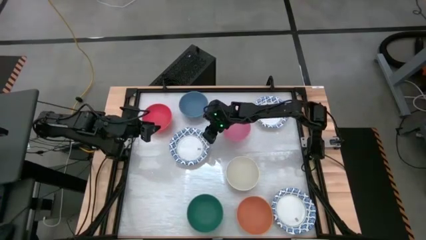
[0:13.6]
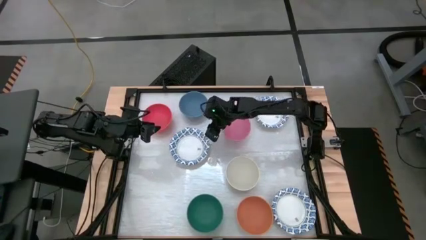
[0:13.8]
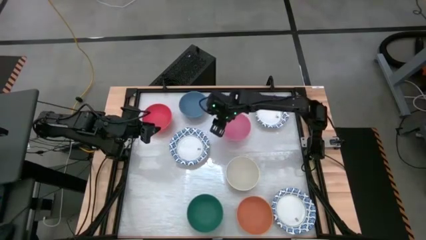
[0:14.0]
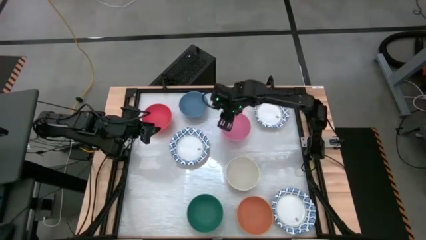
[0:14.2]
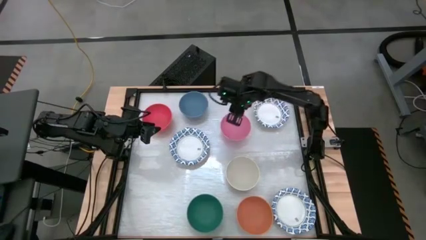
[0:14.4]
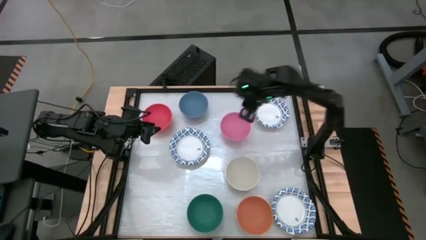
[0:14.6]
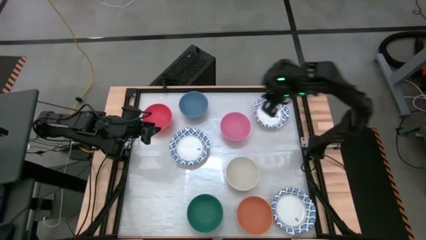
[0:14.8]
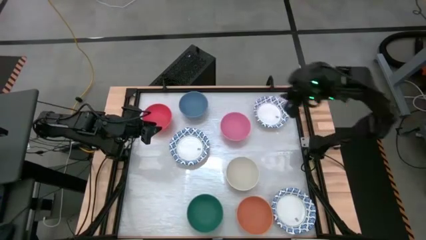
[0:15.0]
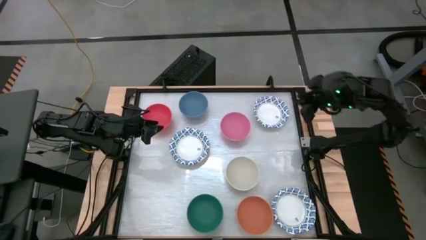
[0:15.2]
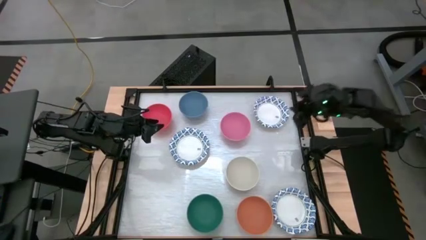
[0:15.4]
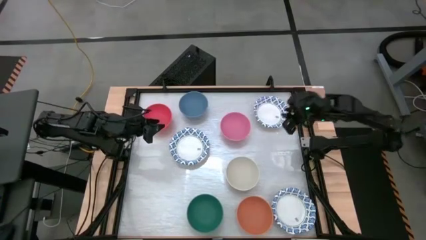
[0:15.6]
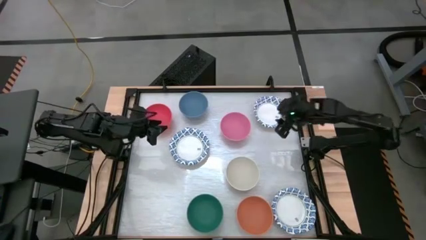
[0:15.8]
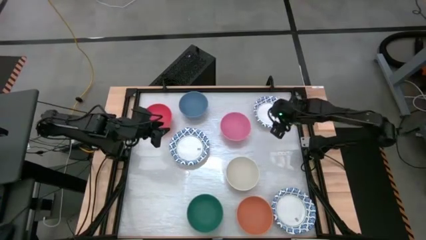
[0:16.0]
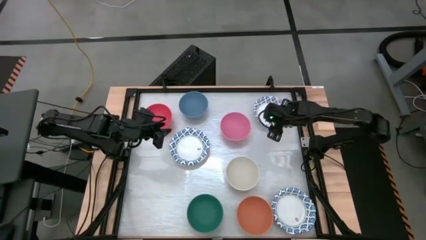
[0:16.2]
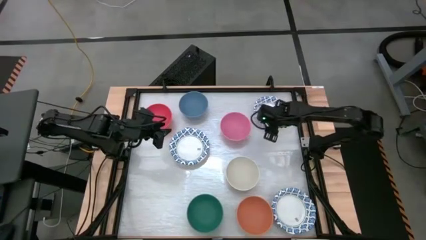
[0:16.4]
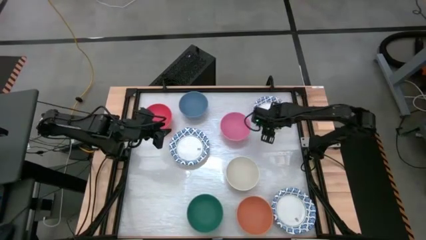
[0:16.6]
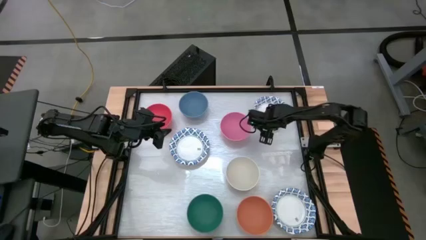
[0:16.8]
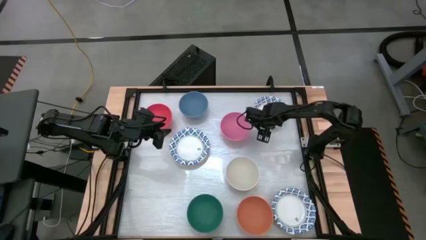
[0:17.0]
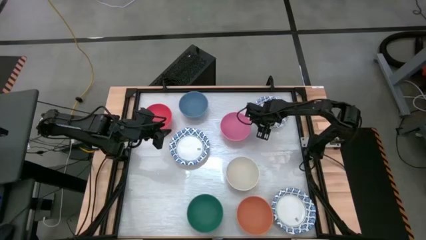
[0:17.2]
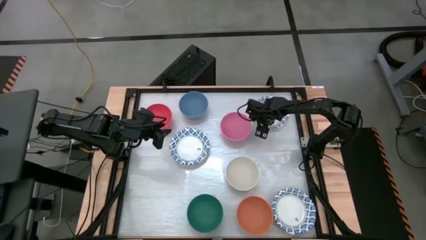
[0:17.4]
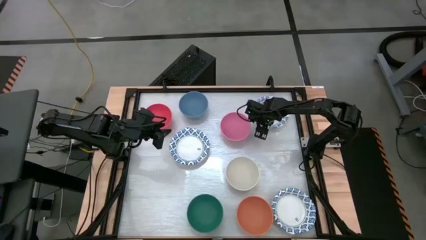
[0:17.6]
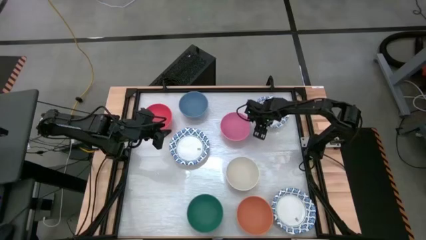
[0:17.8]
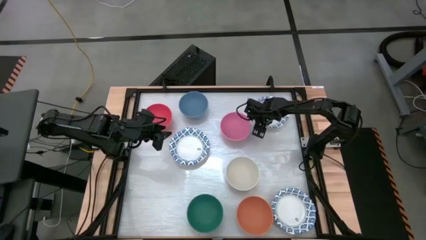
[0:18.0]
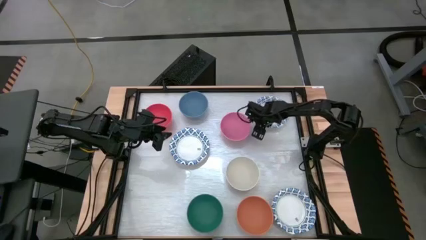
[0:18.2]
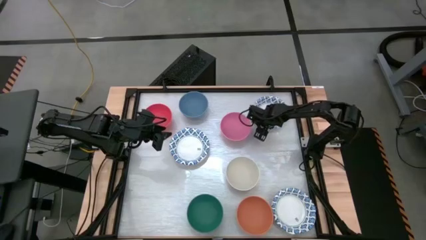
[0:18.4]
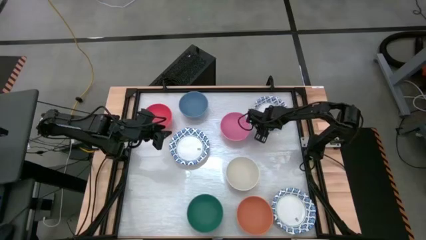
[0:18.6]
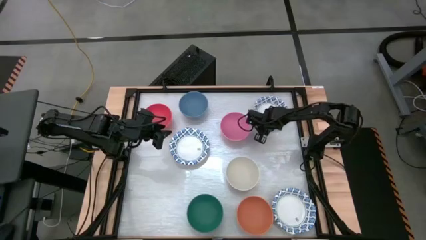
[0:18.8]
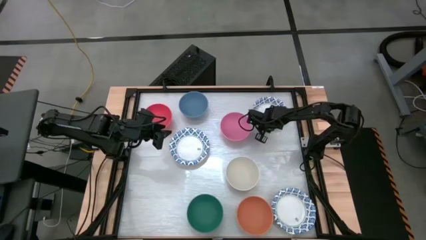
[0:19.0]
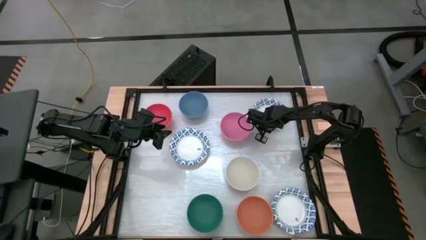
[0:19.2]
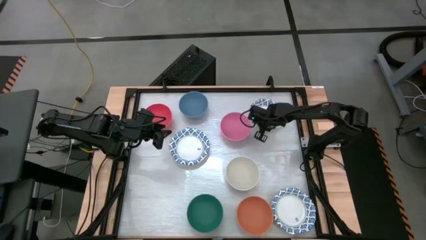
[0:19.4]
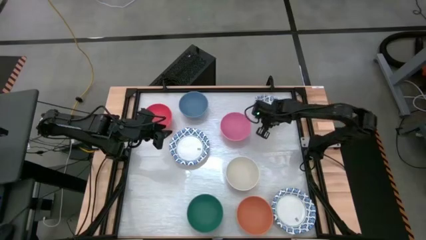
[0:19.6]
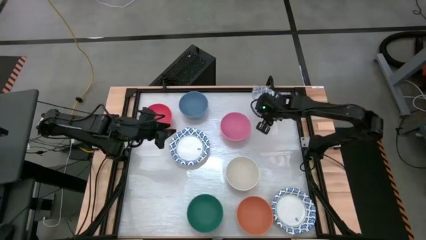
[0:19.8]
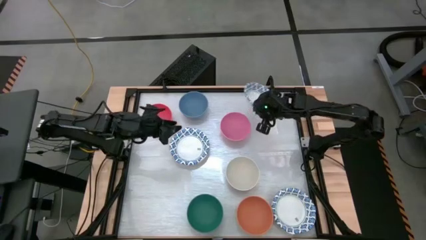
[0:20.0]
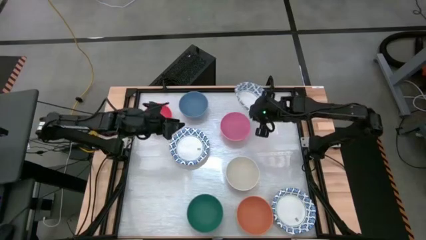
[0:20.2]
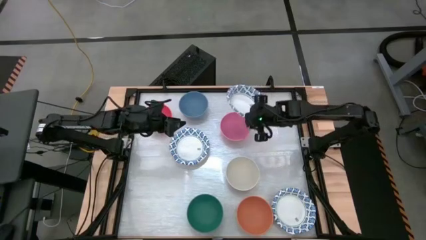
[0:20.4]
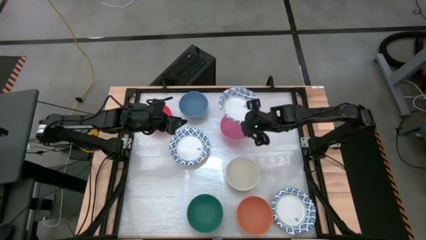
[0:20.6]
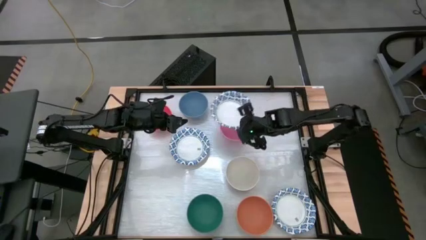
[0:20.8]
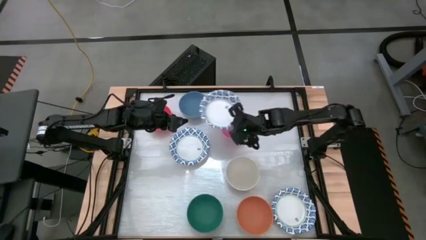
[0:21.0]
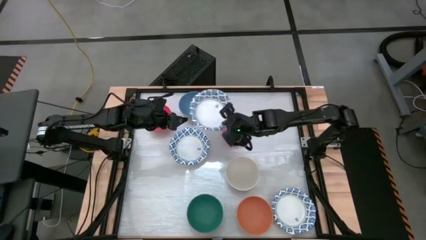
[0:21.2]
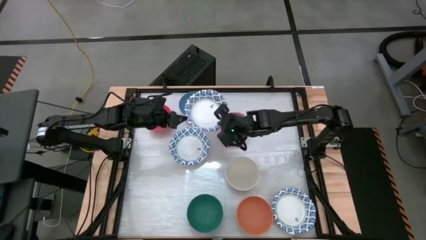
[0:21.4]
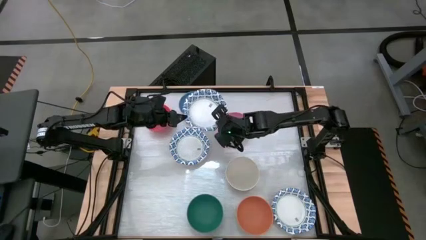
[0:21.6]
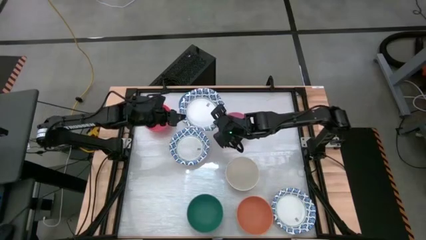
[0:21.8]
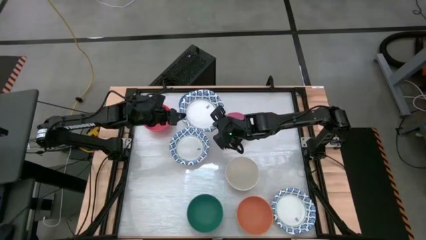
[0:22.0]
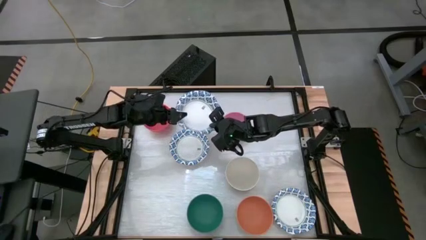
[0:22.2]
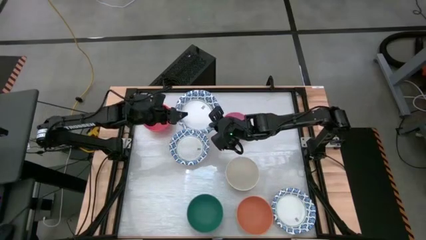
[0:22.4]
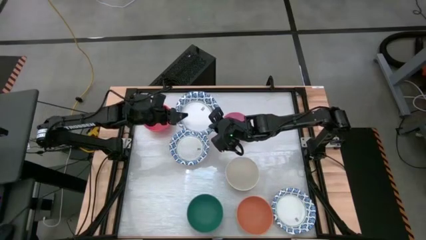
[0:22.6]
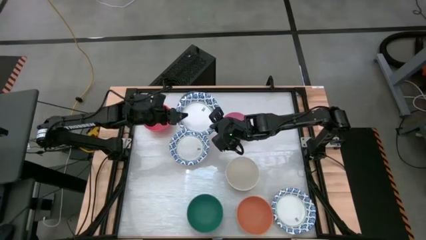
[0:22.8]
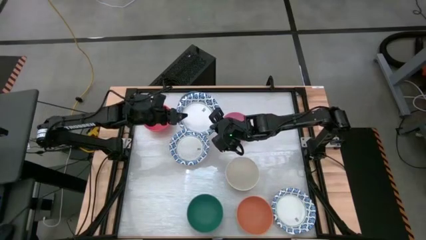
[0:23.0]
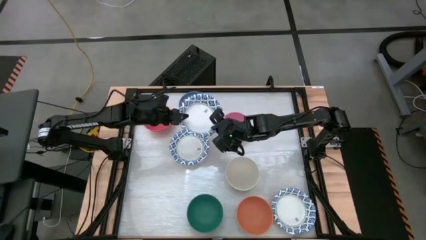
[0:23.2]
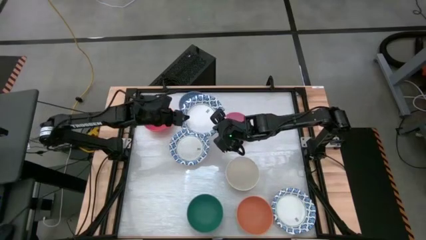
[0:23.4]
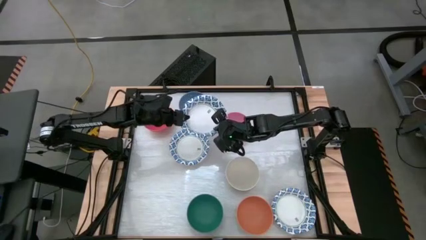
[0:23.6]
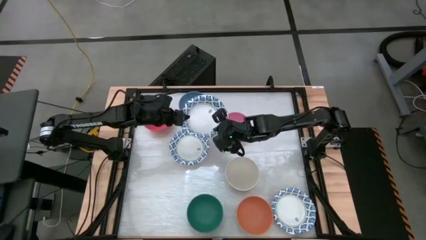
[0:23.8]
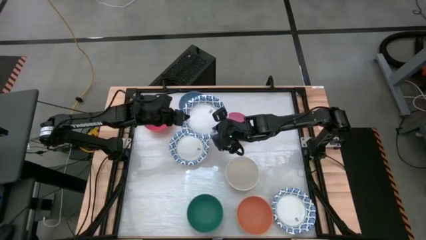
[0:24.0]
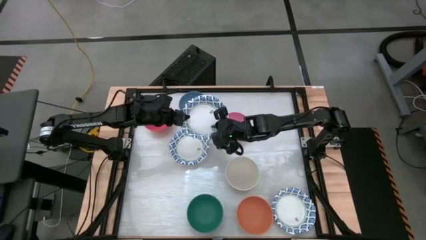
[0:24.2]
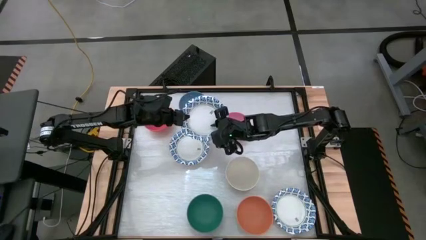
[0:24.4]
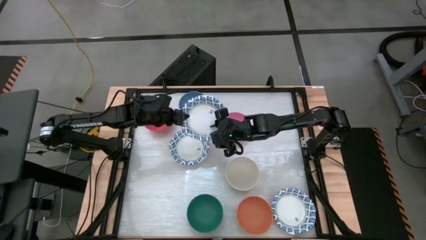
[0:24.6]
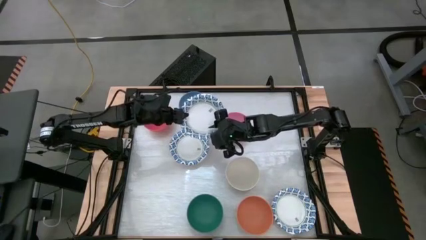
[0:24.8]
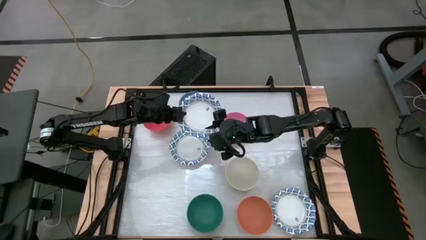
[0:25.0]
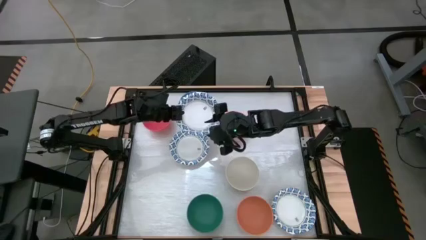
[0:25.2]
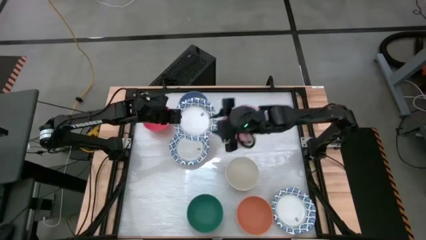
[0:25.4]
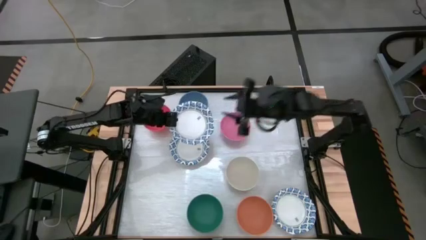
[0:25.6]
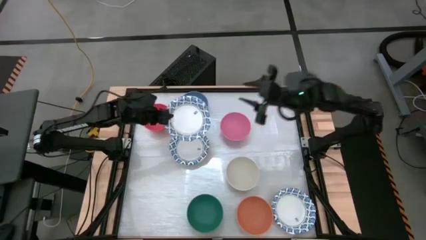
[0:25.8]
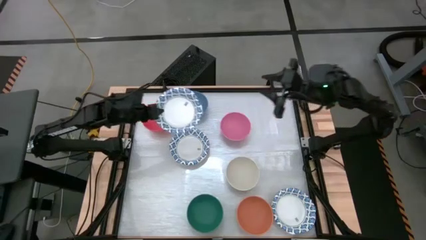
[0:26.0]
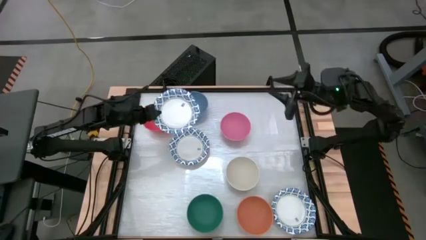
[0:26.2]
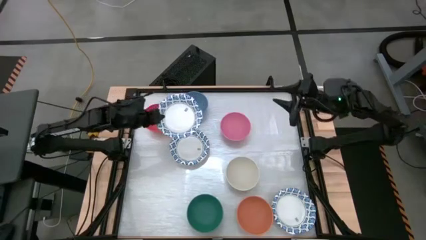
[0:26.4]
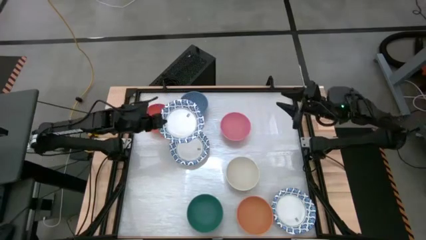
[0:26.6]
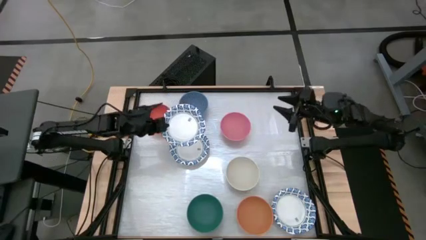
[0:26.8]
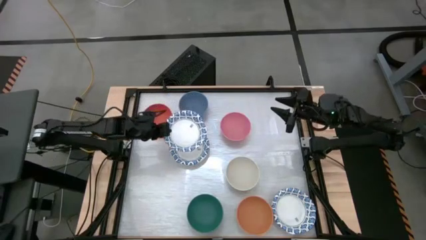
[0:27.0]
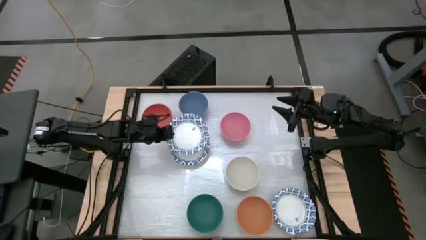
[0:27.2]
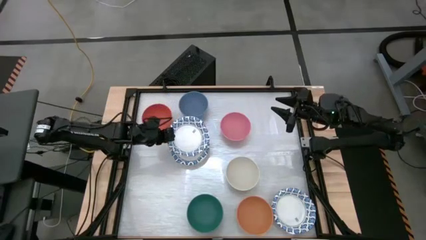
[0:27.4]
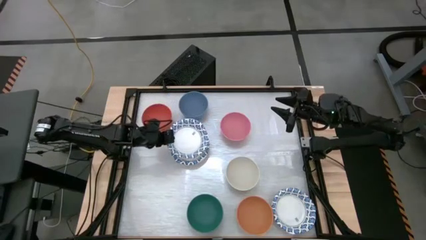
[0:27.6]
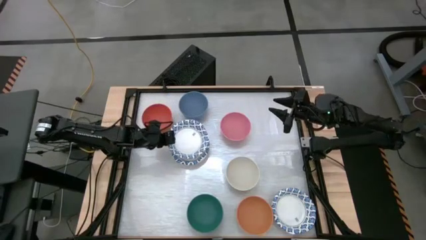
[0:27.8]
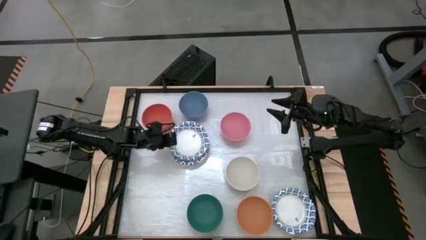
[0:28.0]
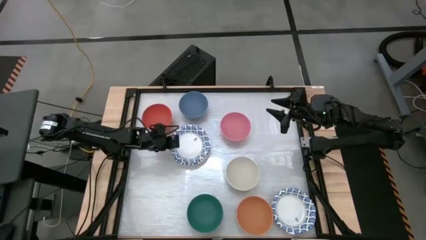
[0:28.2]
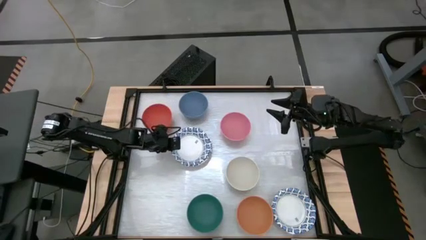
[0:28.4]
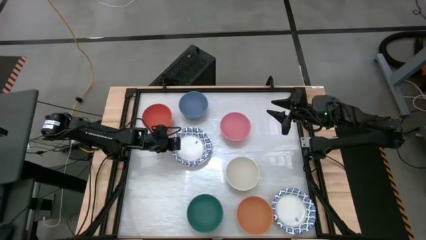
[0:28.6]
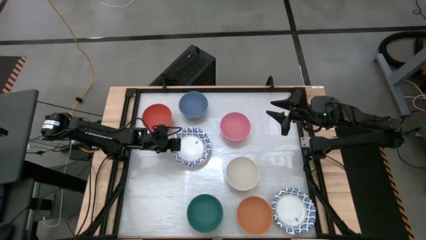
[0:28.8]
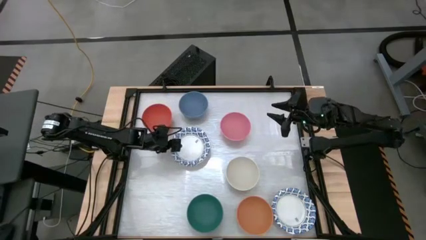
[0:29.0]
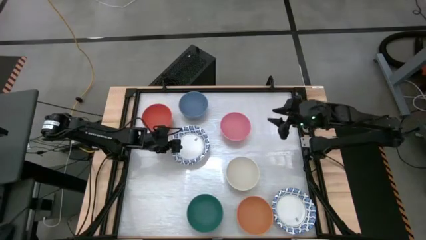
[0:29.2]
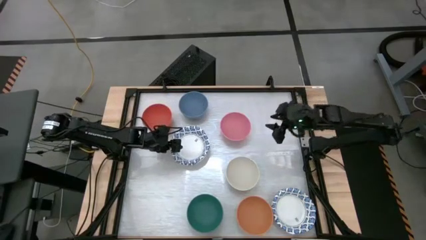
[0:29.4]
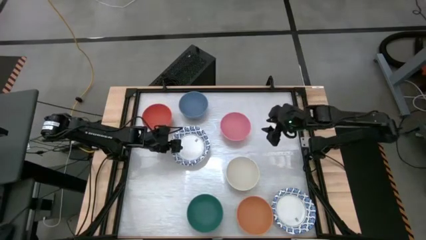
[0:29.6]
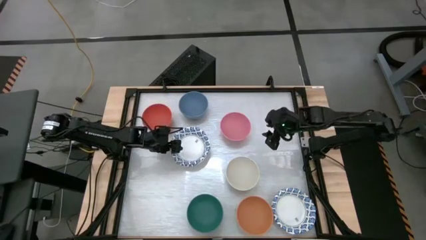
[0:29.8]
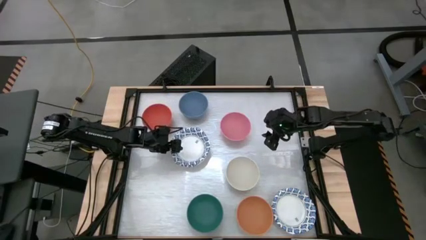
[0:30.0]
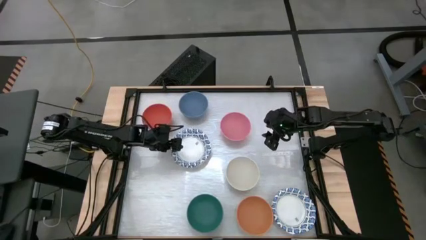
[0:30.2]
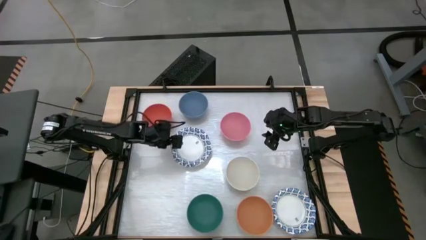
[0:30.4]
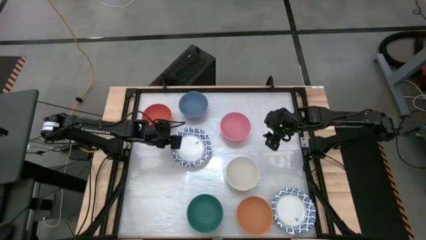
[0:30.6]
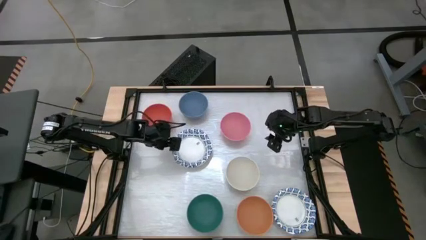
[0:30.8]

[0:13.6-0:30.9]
Stack the blue patterned bowl on top of the blue patterned bowl
